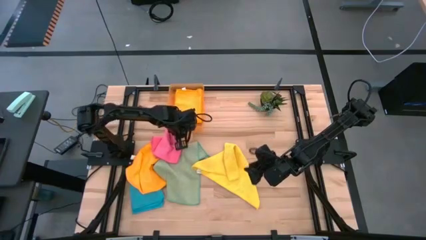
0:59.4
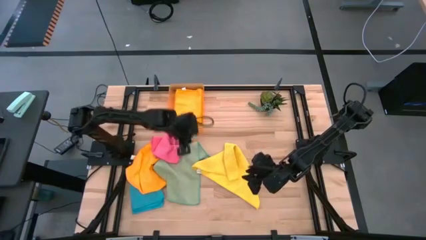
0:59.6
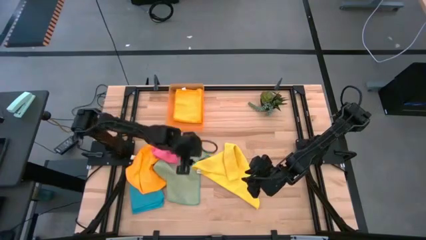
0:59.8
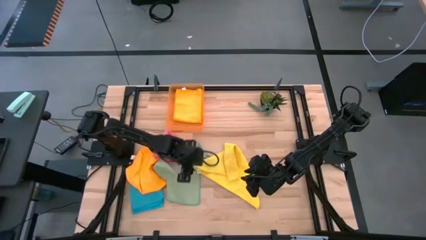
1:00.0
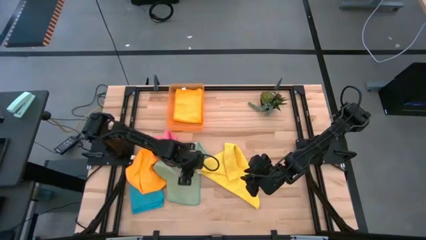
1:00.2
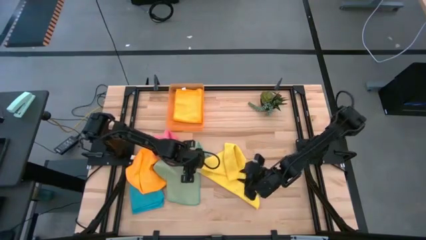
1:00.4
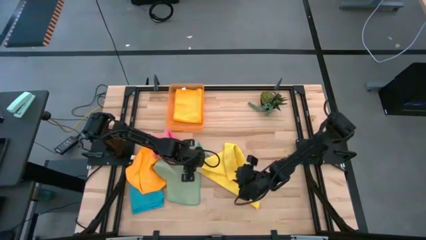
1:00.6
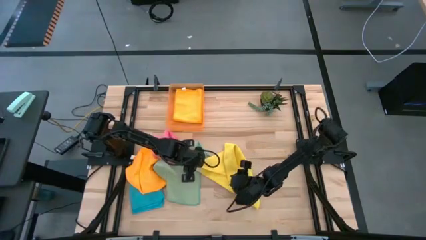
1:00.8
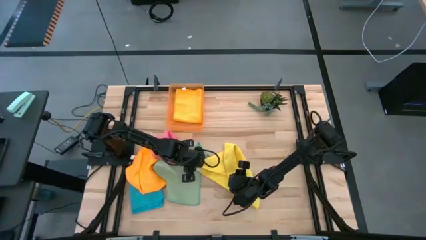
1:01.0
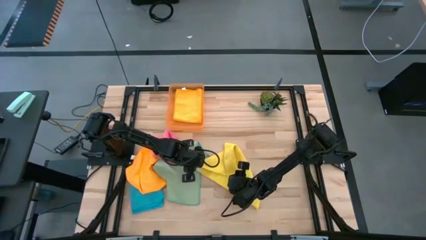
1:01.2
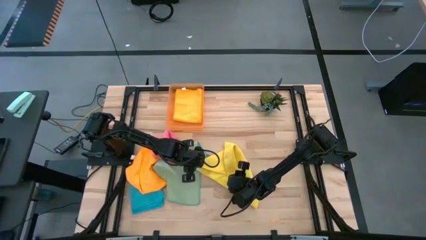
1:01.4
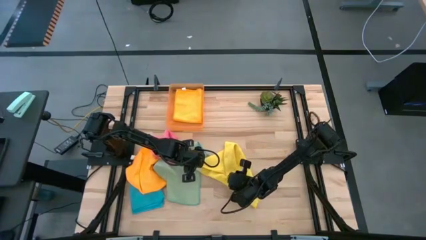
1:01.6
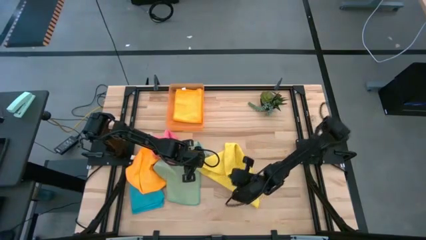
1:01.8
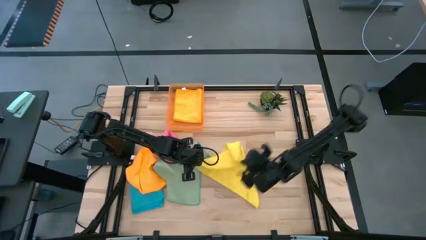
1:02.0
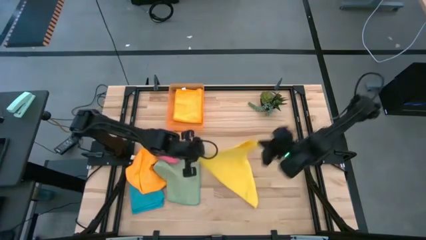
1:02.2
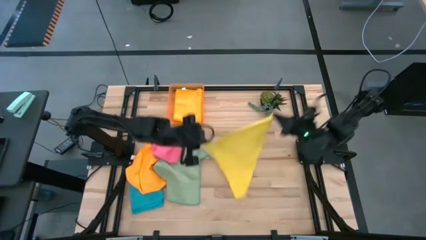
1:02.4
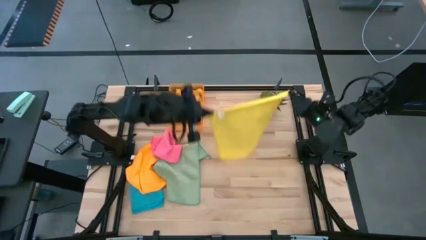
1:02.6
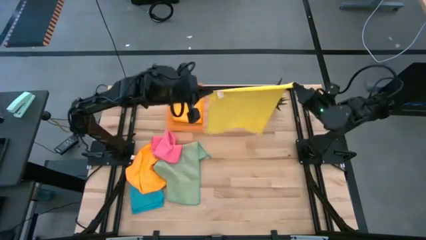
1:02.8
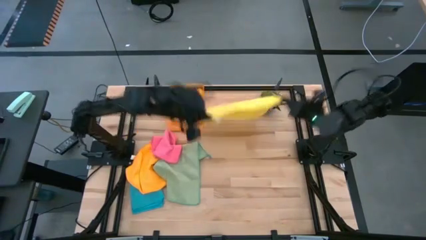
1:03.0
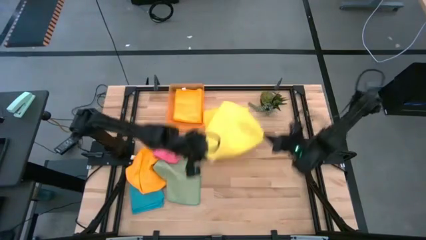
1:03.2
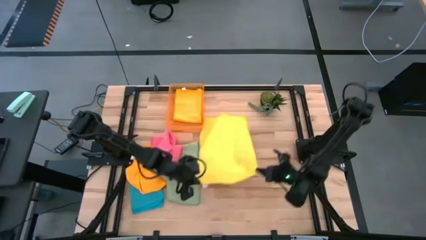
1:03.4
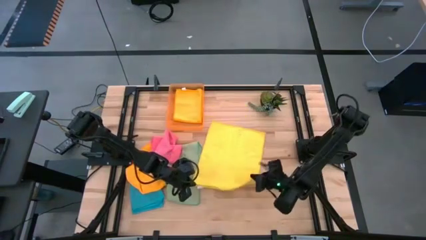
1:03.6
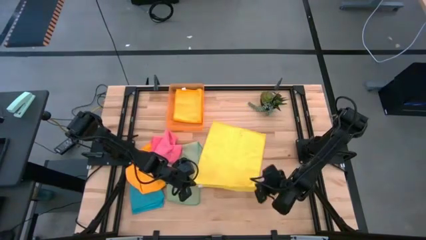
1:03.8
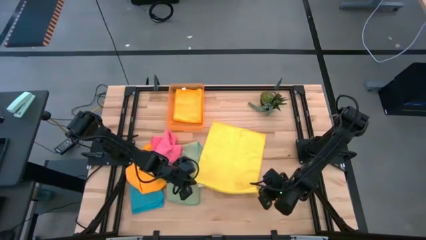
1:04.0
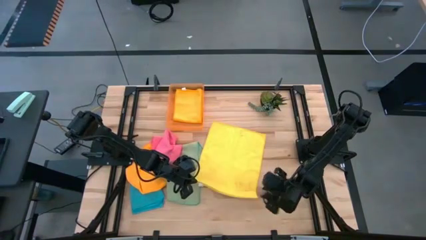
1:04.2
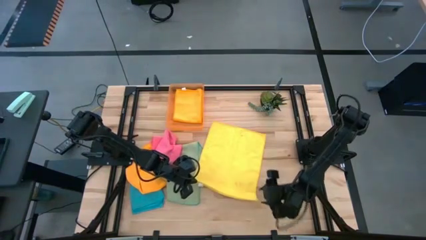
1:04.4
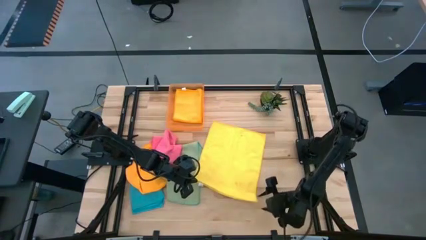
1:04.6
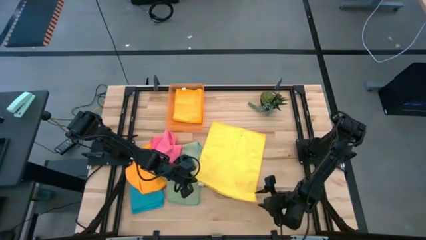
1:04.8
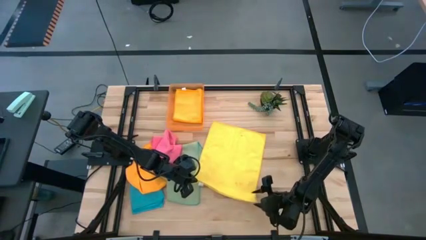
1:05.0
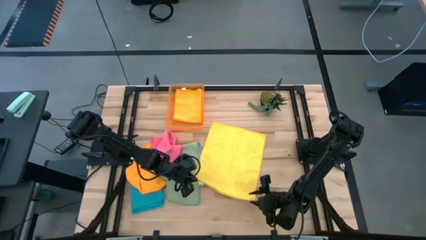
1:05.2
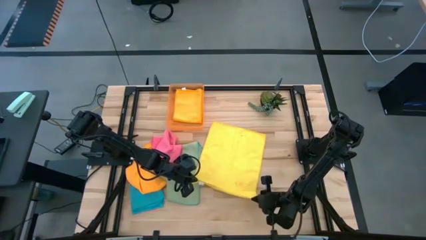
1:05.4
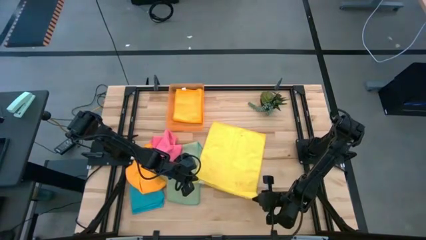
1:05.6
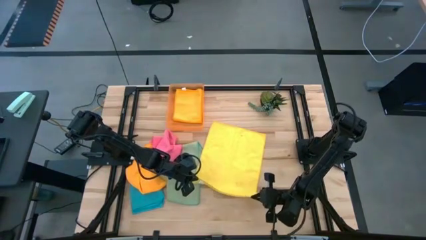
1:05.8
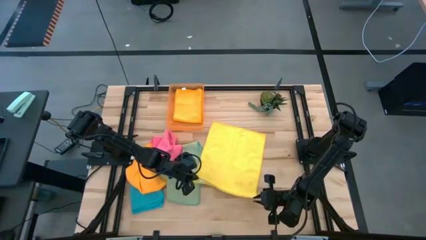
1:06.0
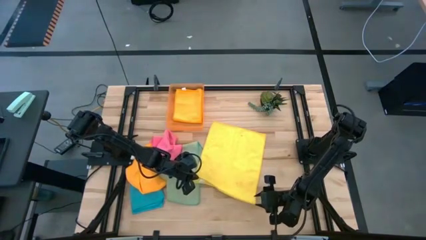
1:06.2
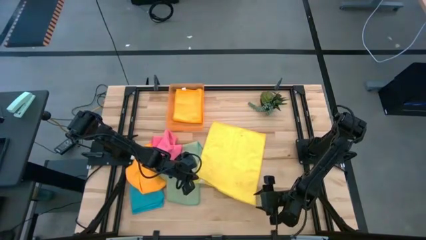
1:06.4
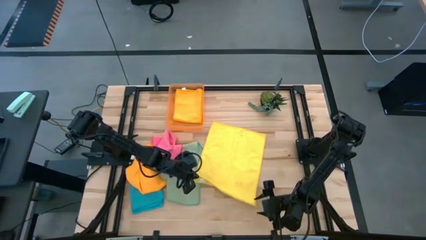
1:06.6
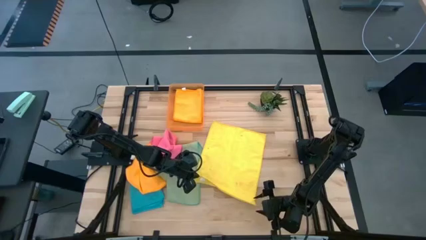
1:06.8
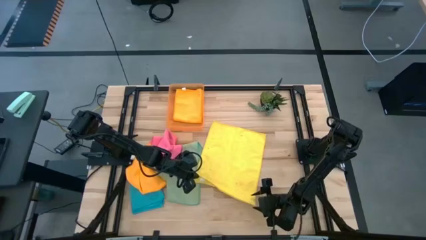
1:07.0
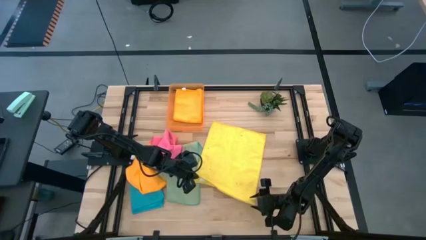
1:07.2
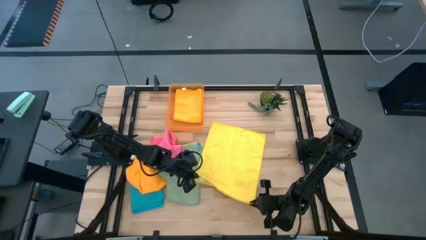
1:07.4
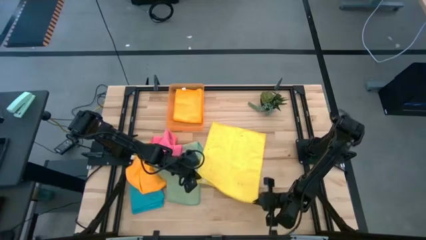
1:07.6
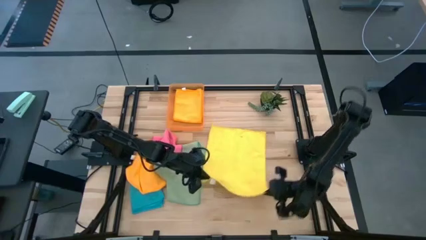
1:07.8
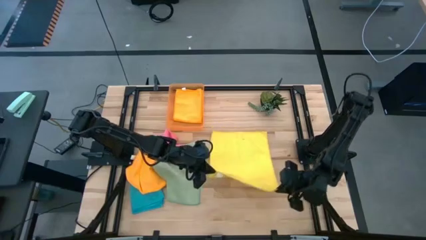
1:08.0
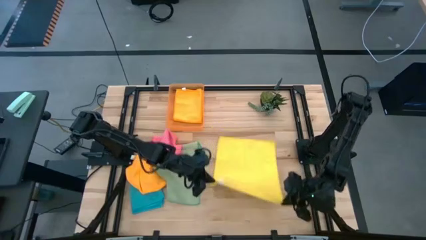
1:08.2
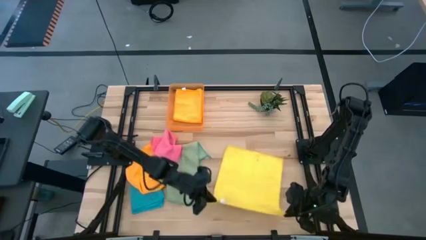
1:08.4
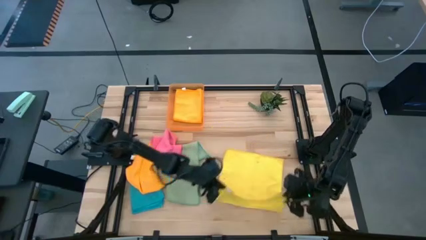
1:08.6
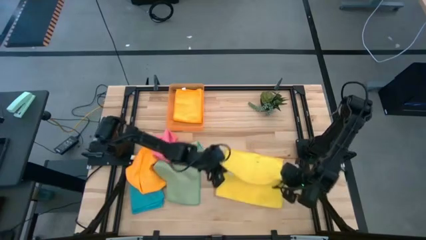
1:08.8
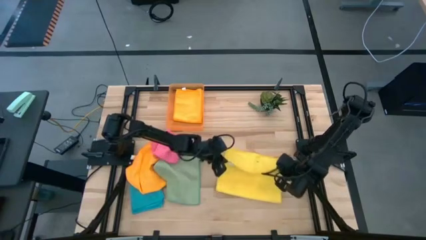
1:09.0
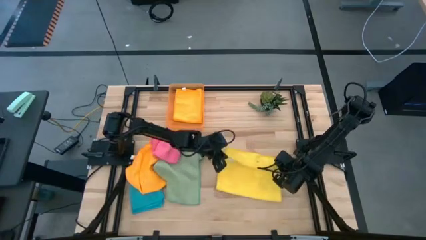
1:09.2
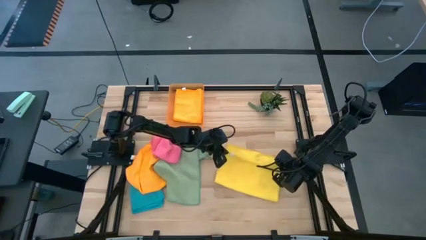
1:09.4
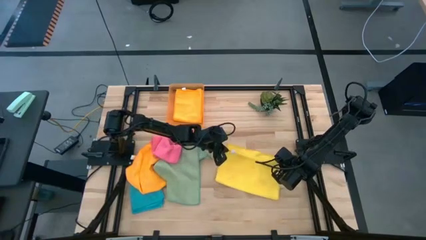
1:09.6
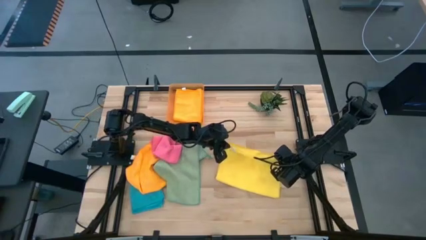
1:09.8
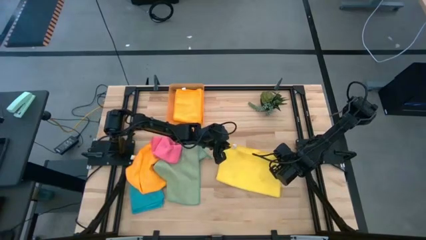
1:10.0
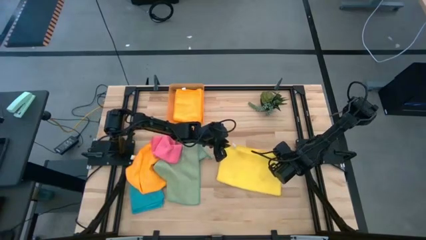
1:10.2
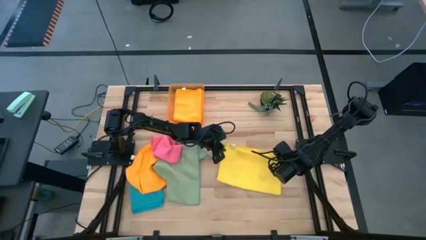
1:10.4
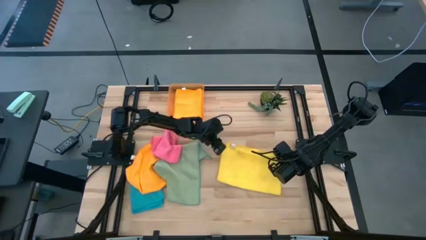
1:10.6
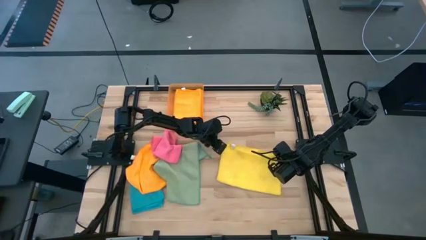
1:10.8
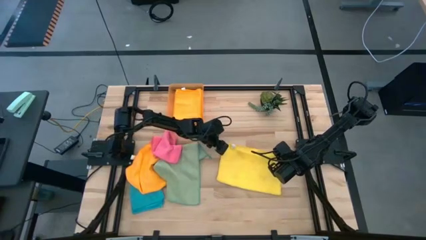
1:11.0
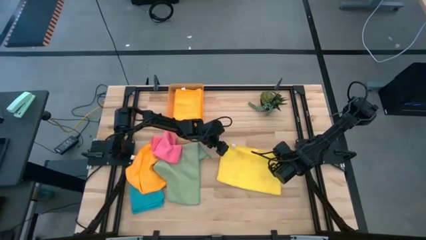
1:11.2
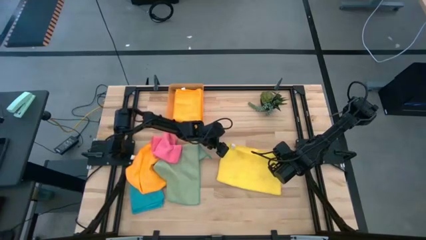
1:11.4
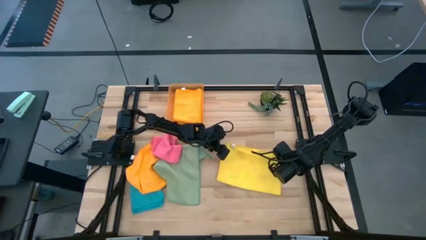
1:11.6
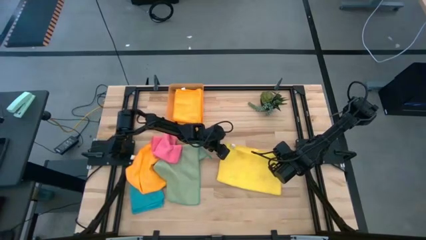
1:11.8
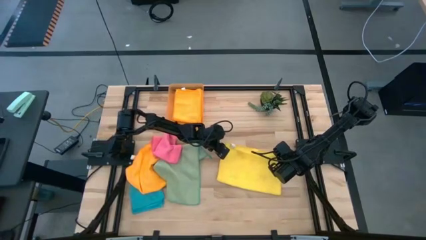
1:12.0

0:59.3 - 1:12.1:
Task: Fold microfiber towels
Fold the yellow microfiber cloth
